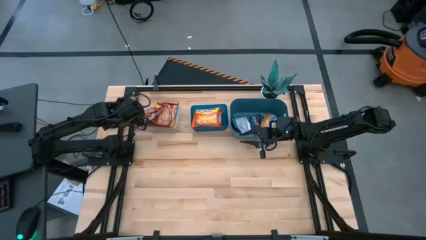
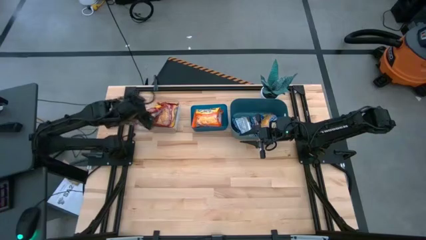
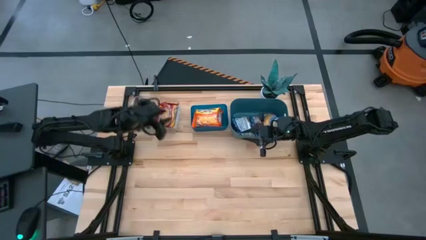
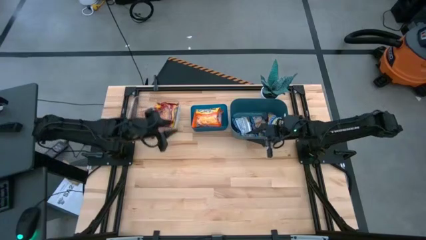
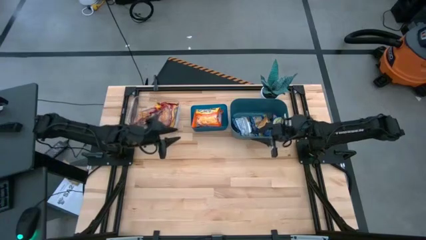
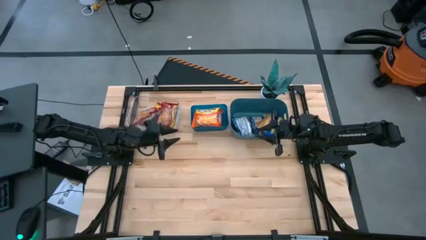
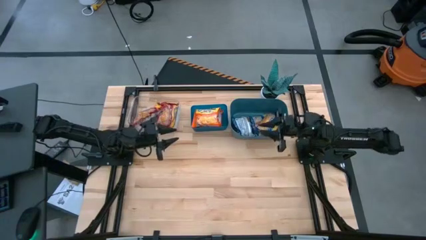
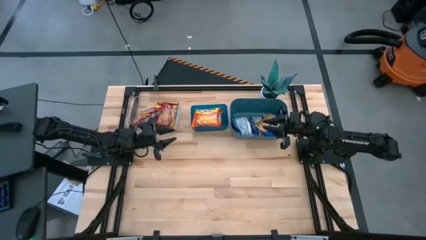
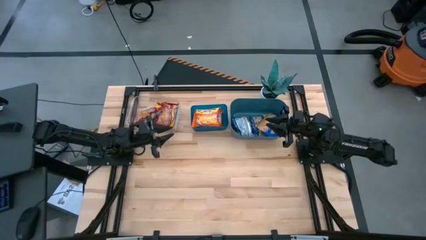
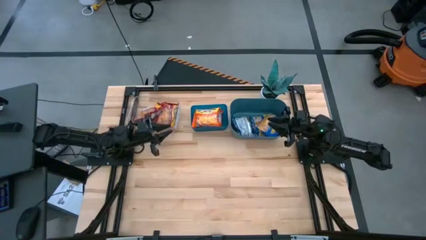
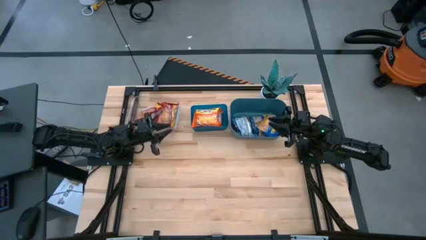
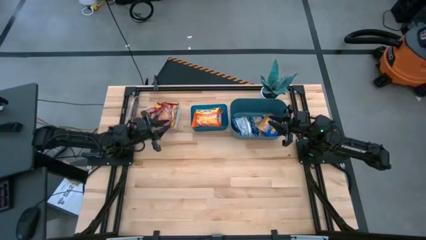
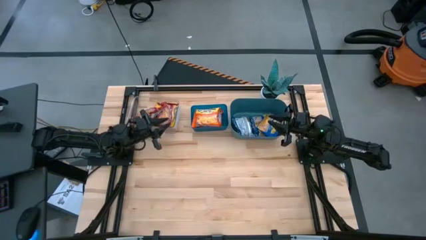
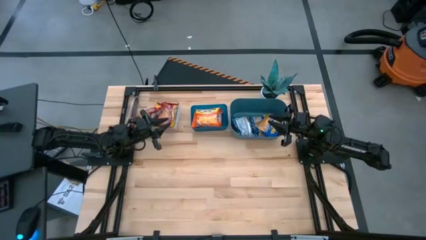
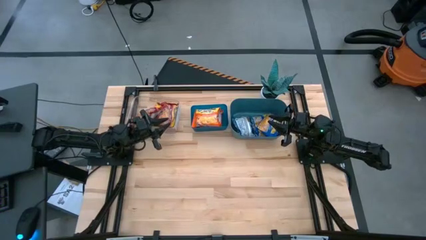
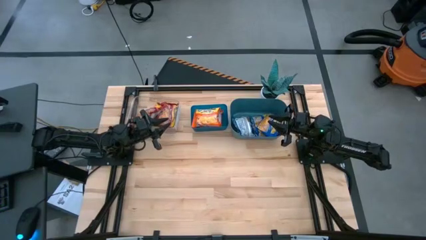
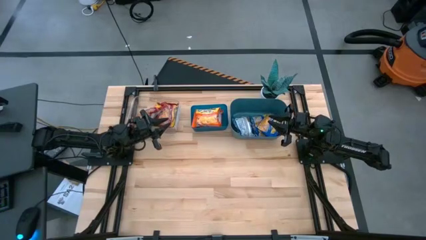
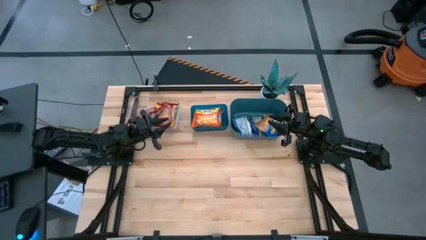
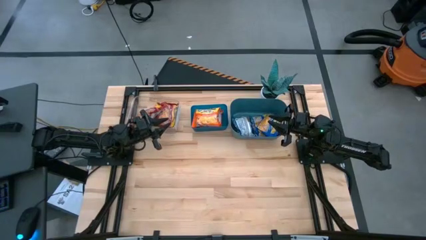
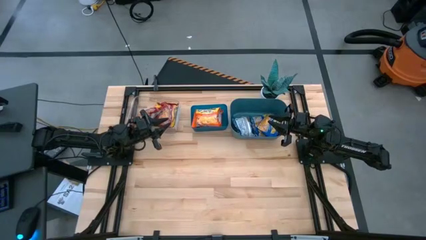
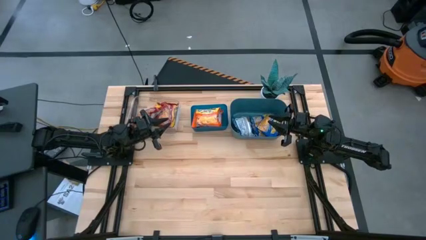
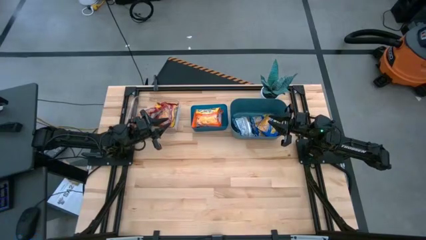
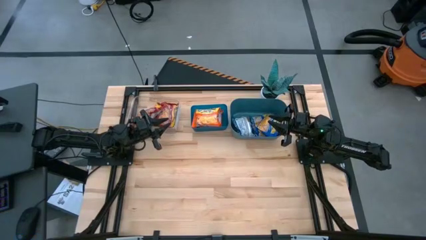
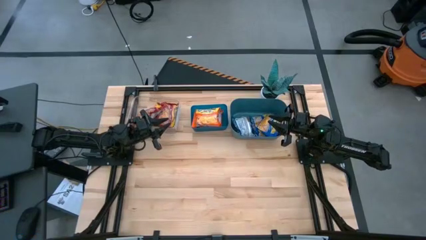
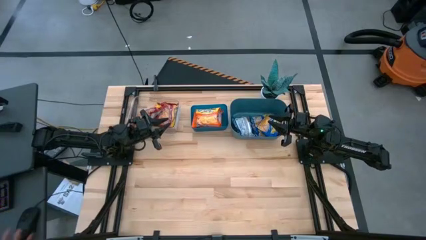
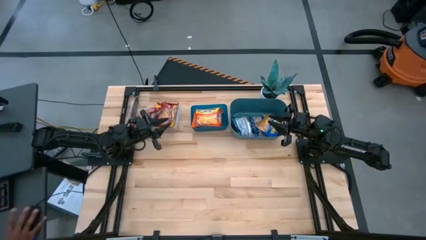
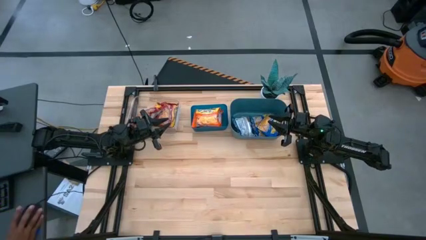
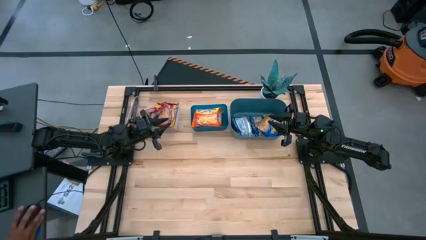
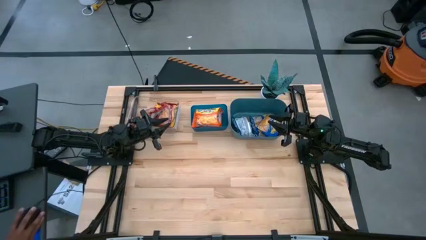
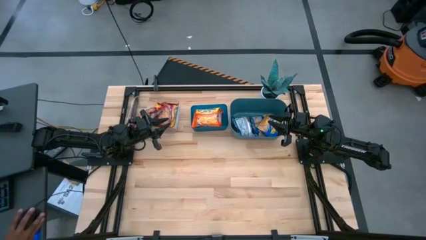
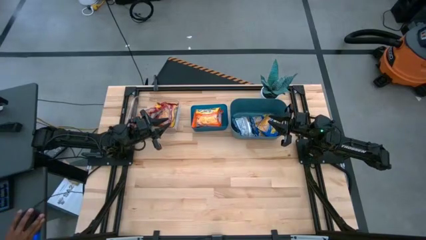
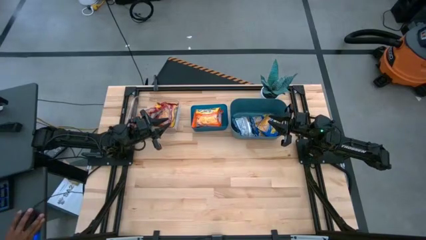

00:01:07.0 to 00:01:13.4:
Task: Sort Maruchan noodles
Return to Home Position

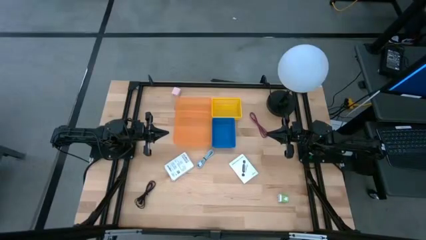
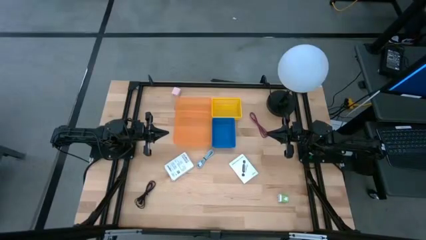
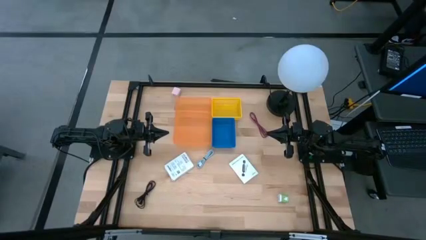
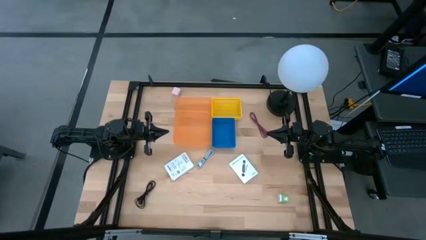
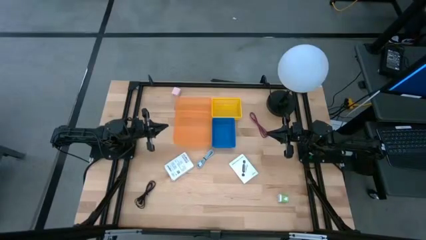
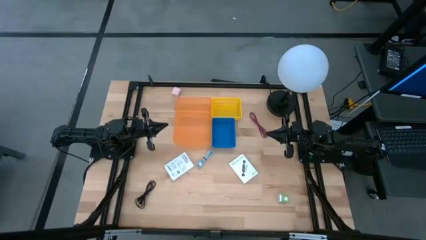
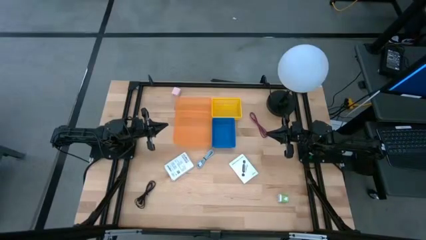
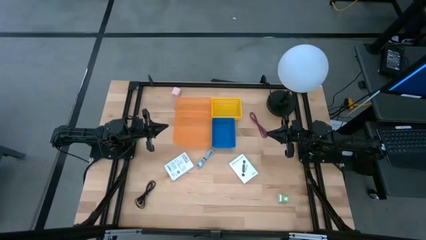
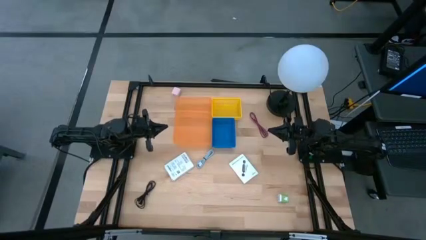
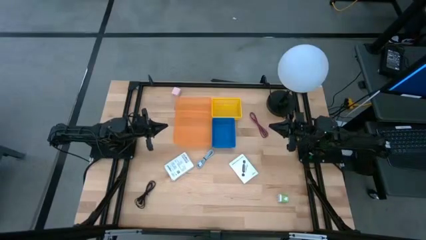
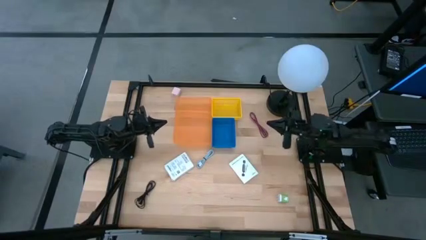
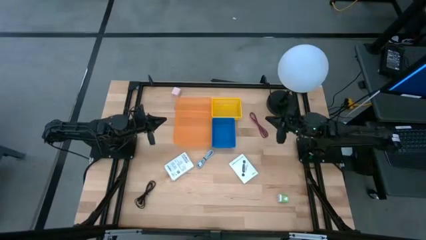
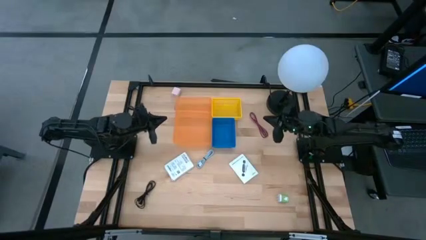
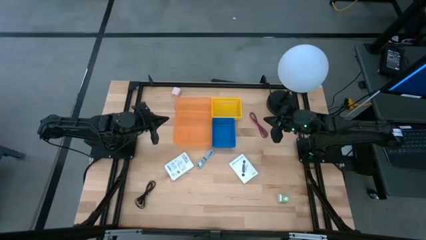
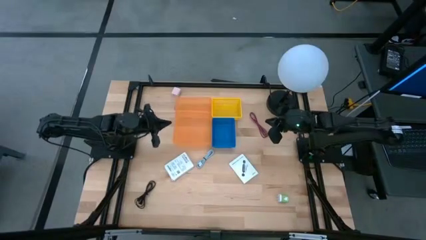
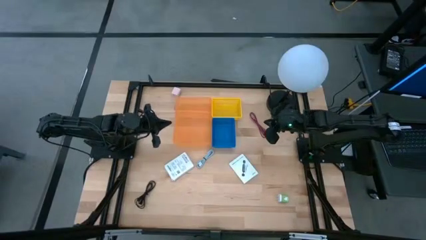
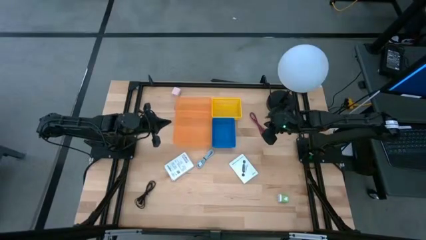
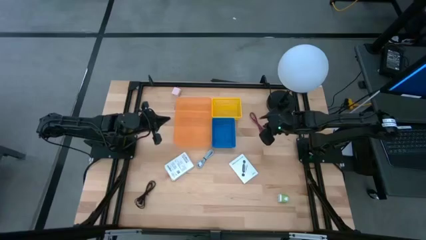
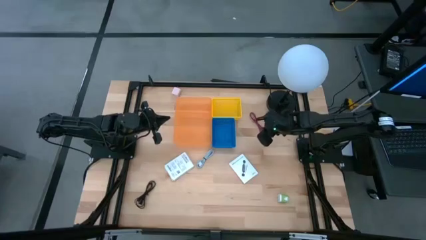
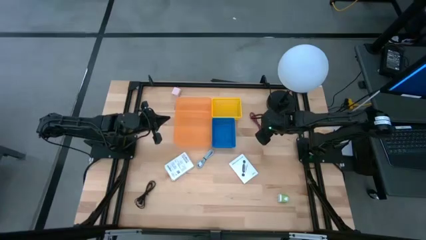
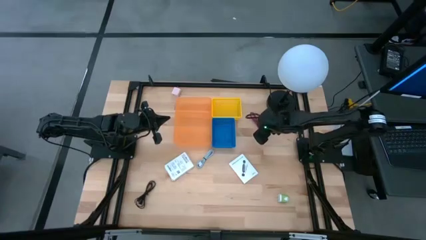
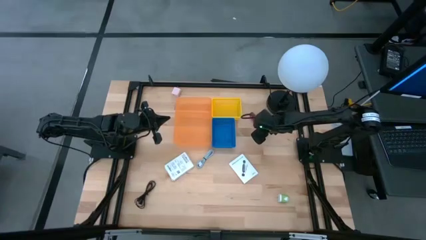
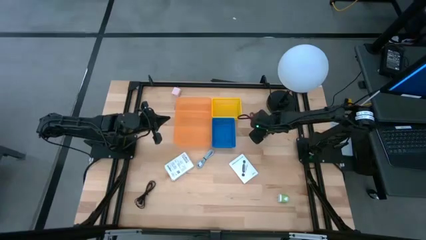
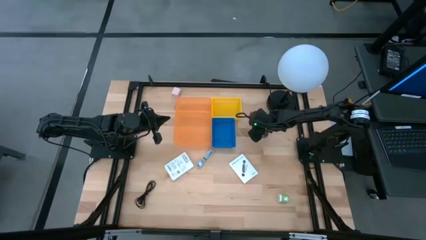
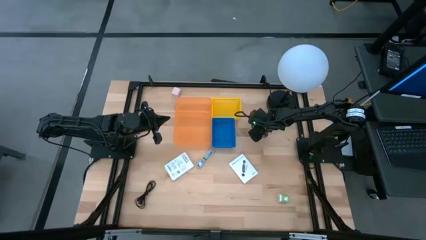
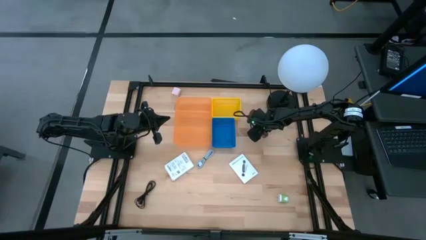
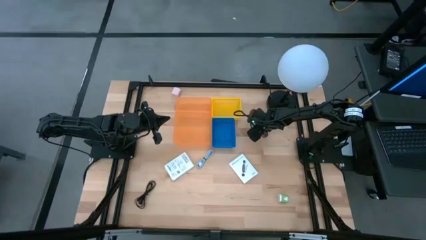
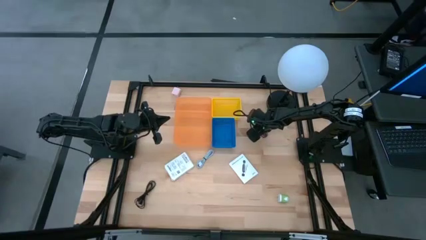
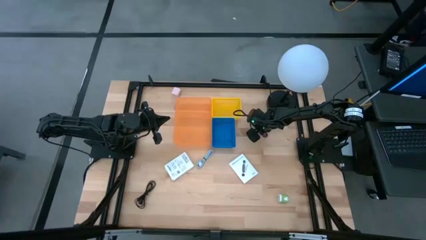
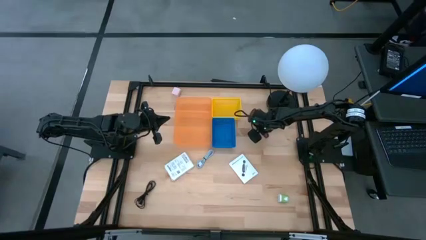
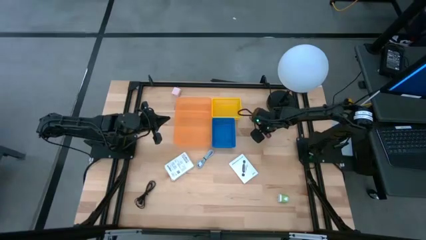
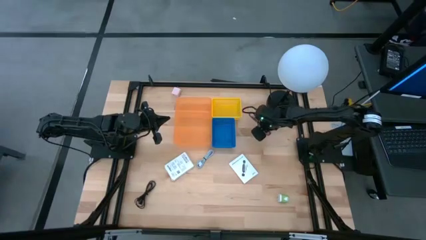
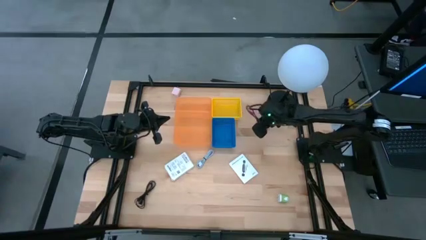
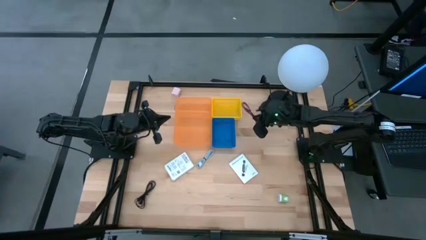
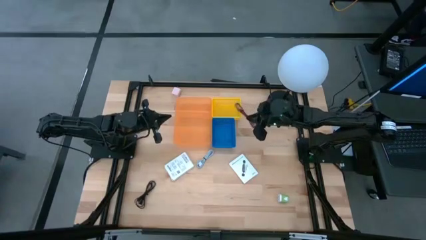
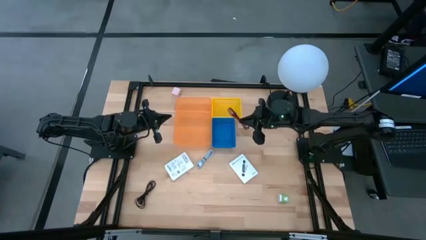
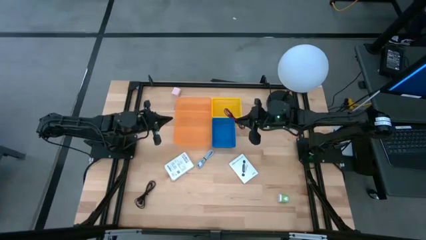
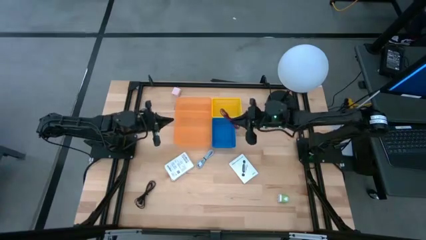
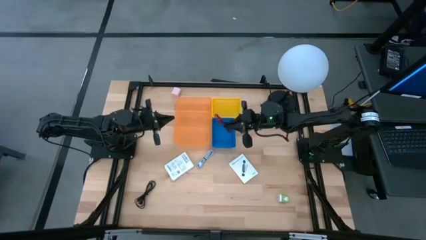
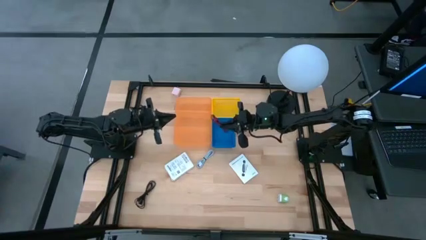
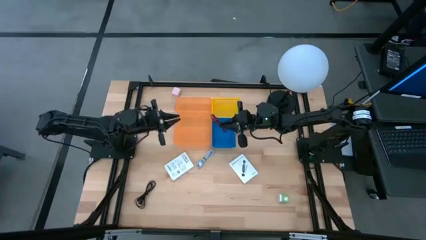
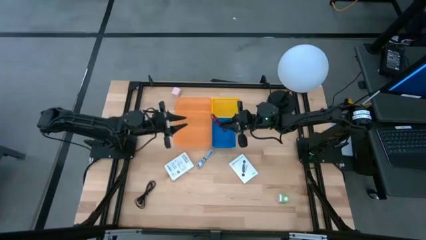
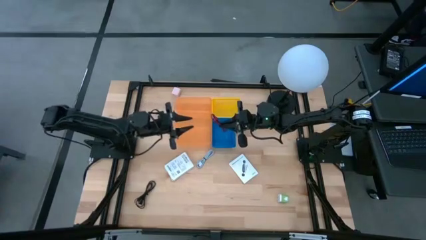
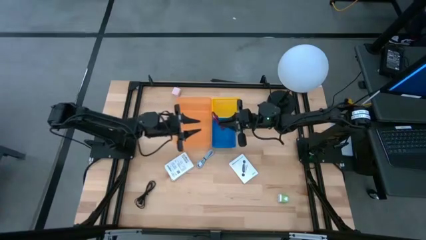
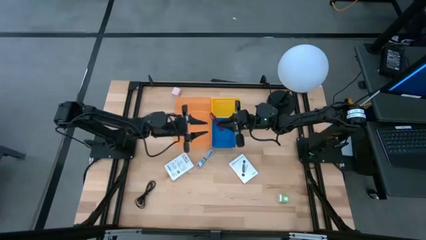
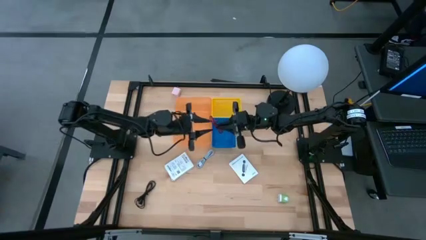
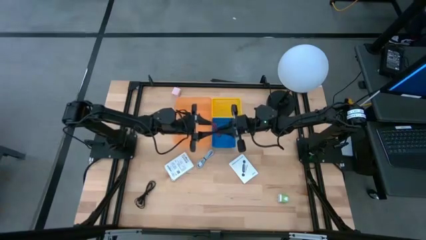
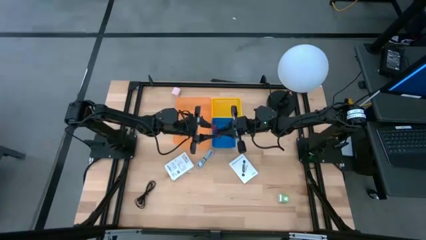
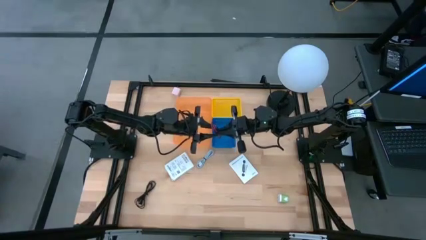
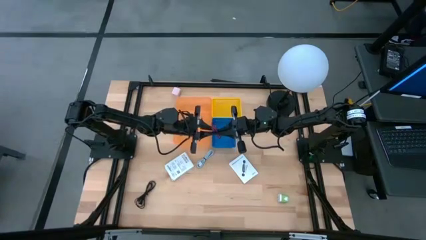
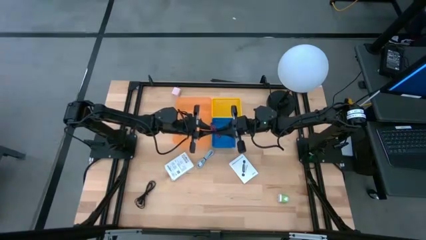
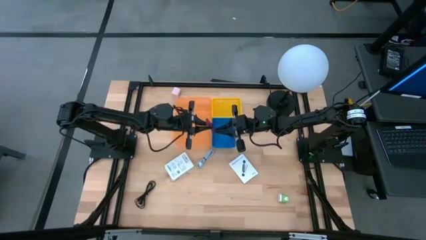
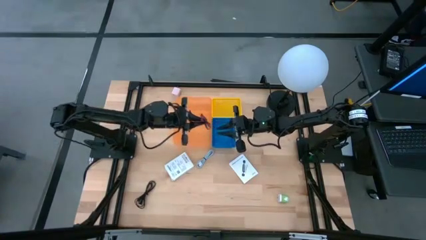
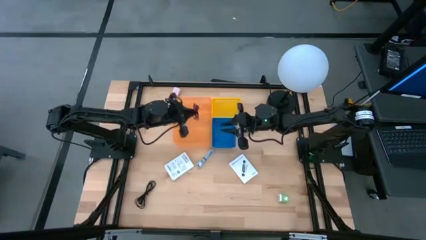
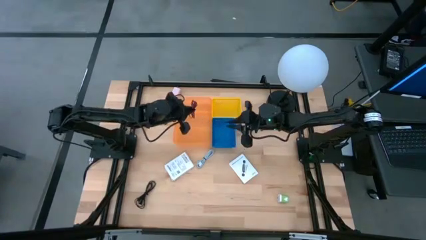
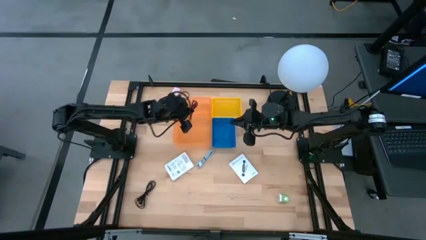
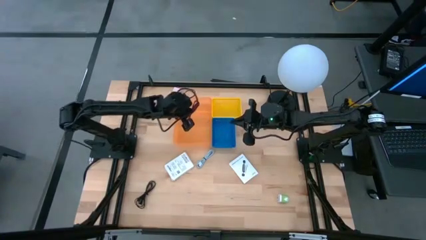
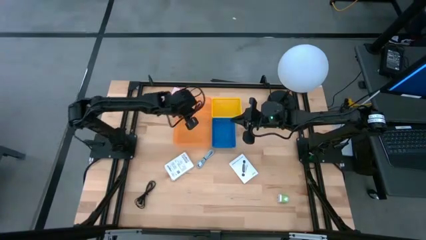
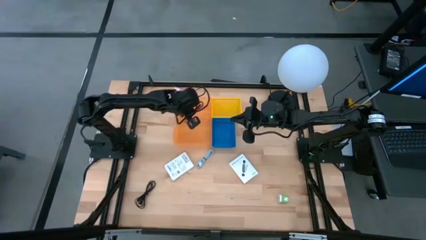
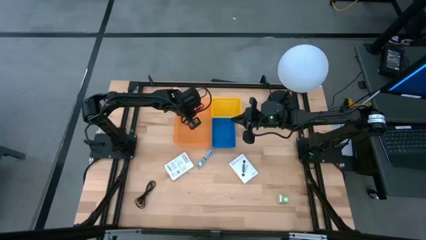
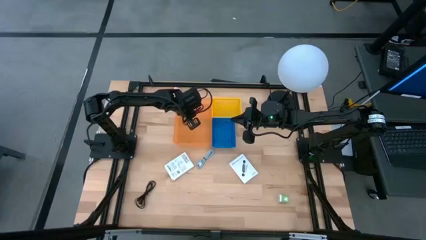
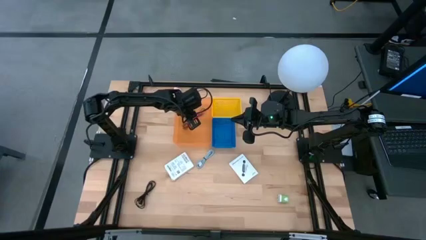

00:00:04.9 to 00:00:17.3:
Task: Pick and place items into bin
Put the red charger cable into the orange bin
